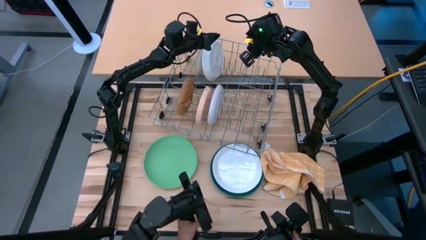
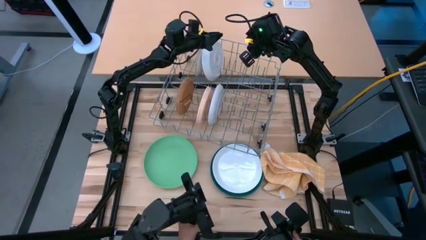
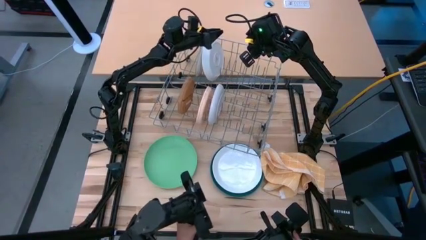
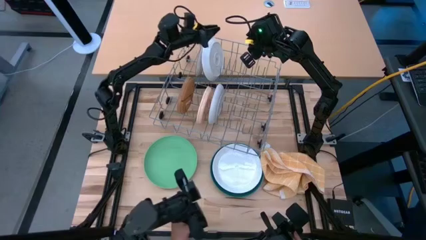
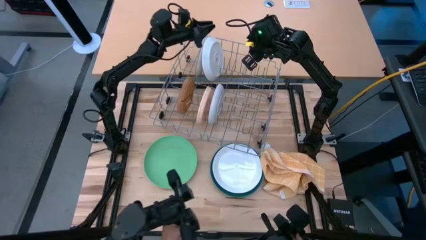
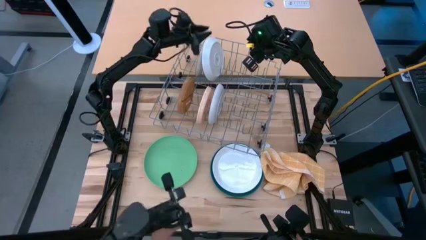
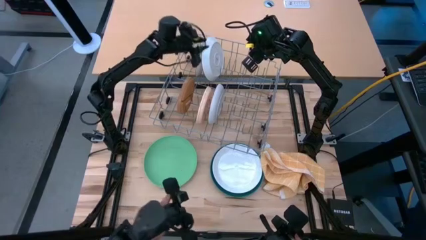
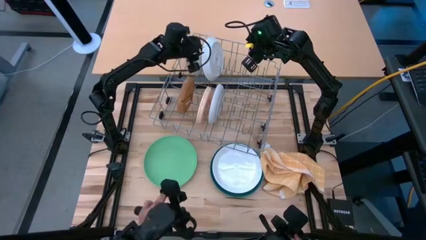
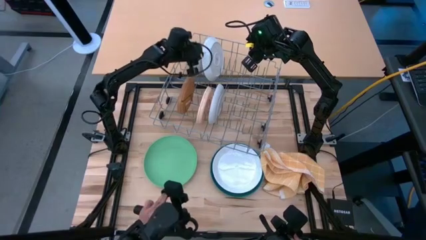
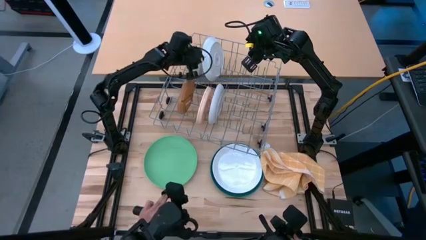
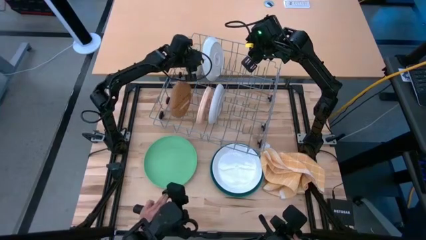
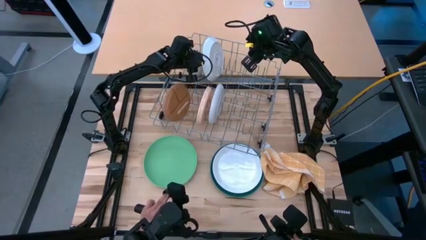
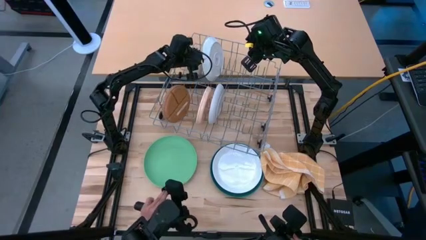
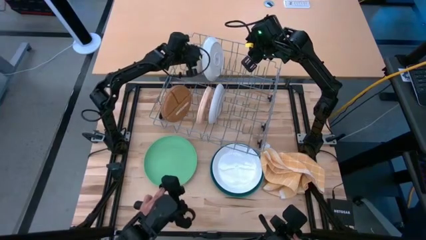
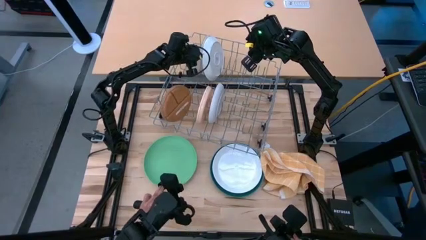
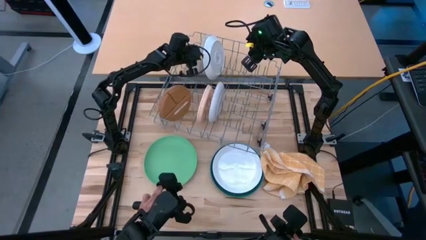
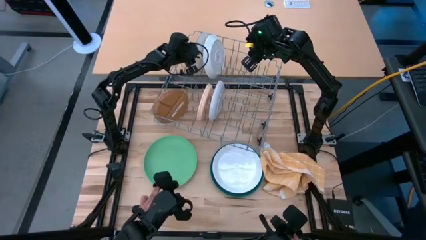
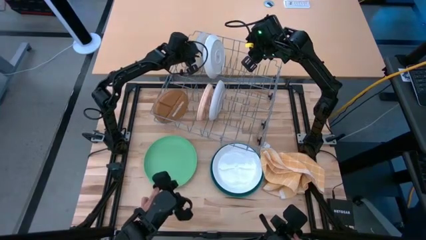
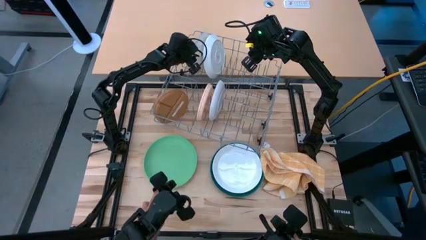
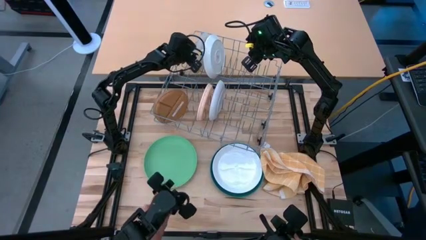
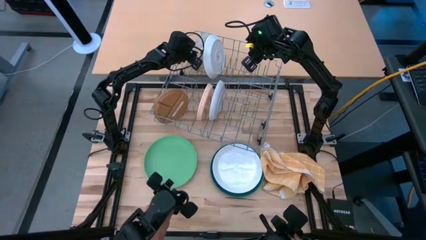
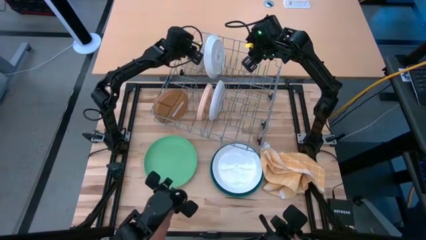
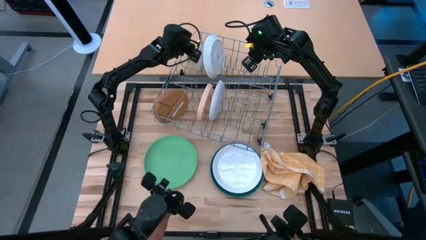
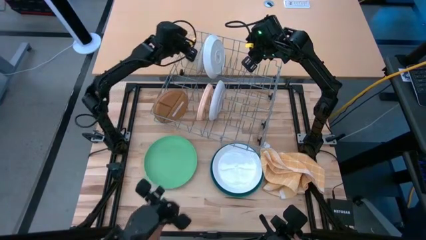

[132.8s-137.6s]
Task: Sort dishes
Adjust the blue patterned plate in the dish rack

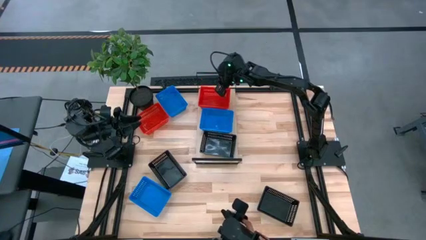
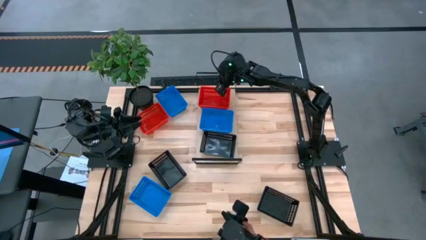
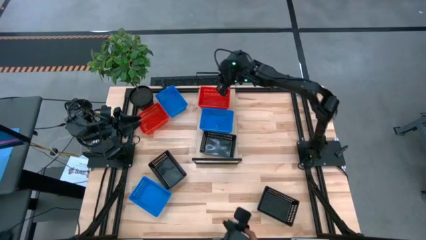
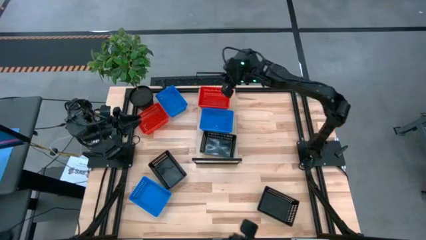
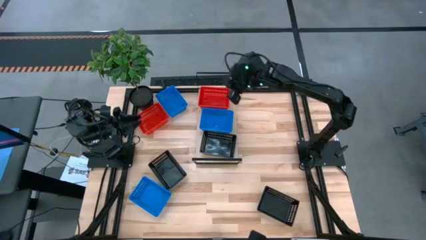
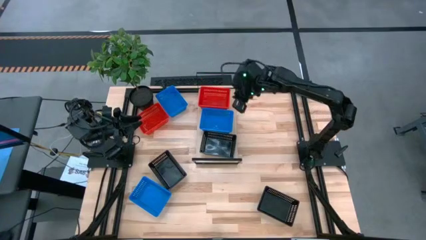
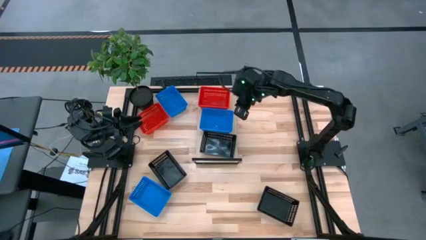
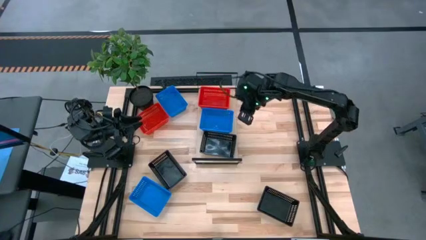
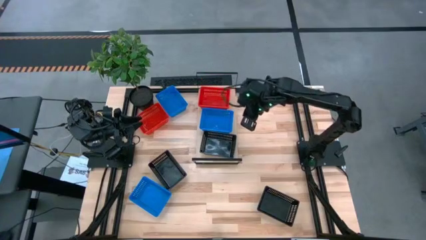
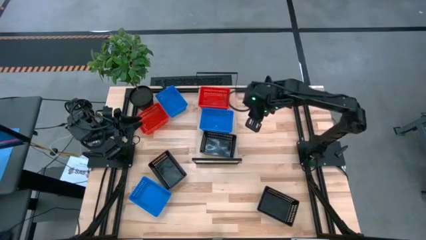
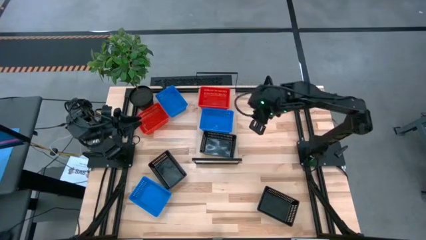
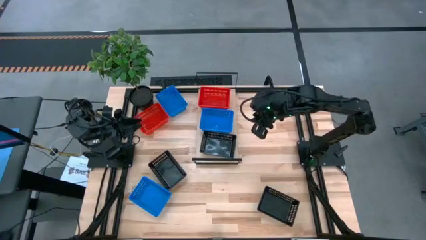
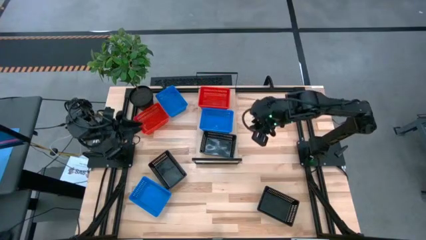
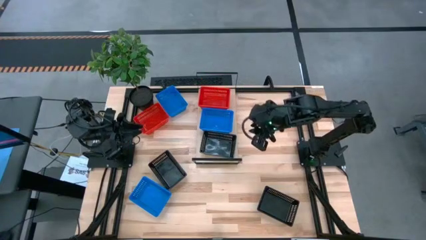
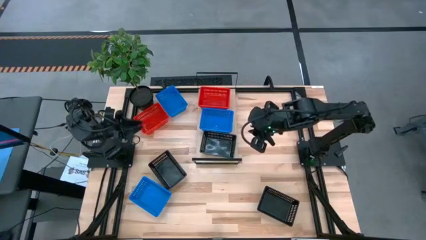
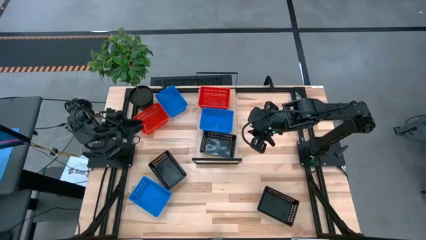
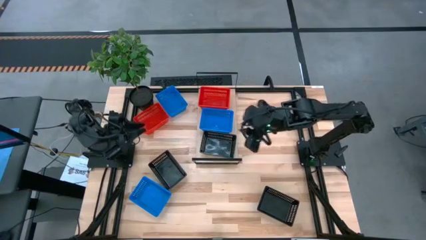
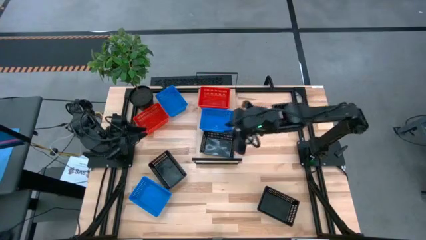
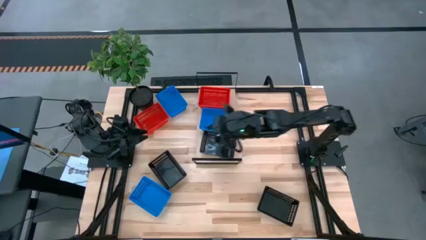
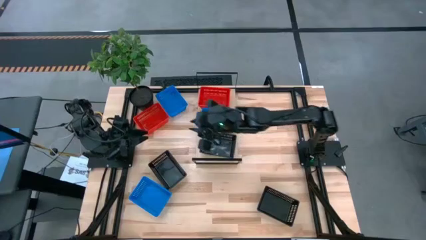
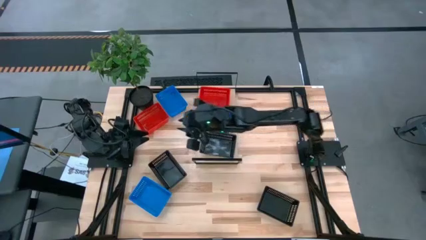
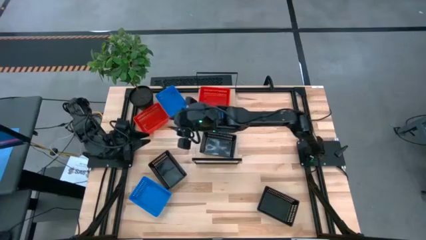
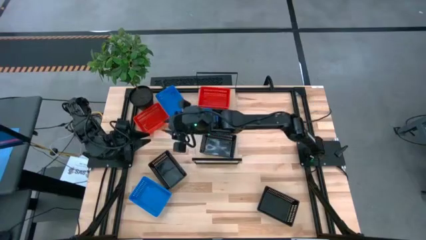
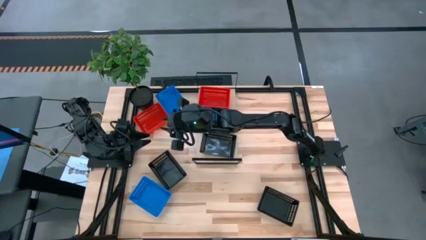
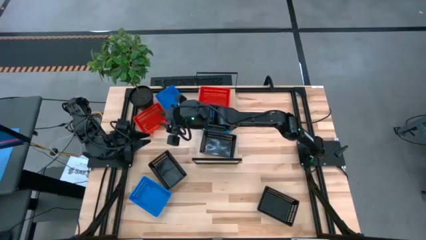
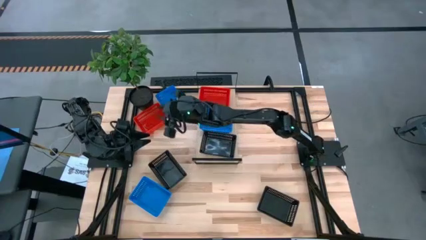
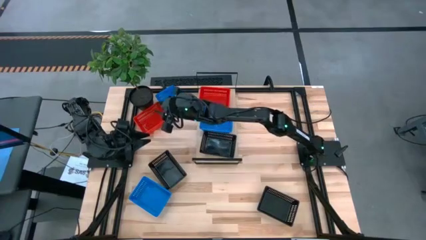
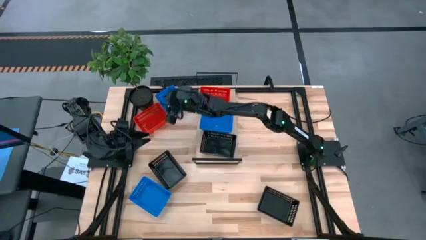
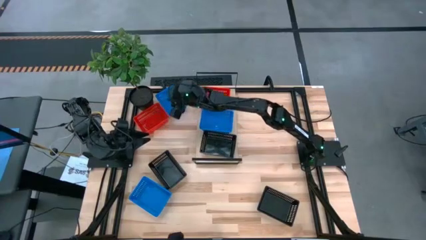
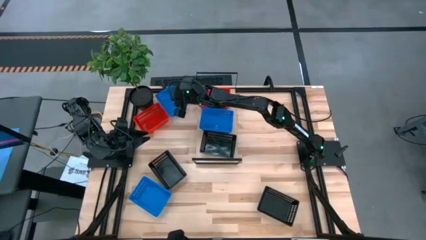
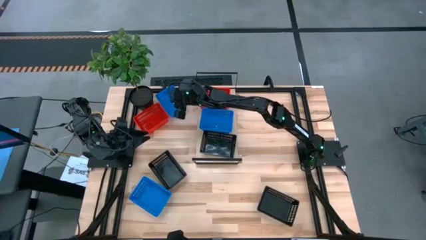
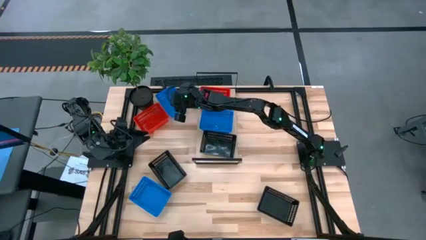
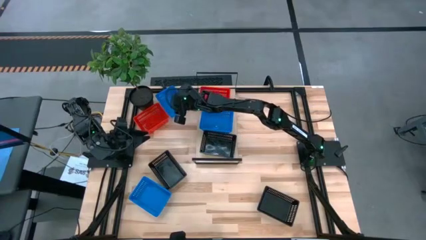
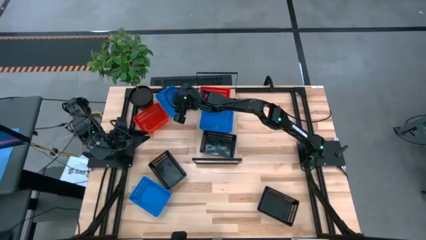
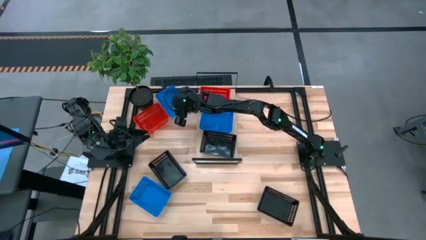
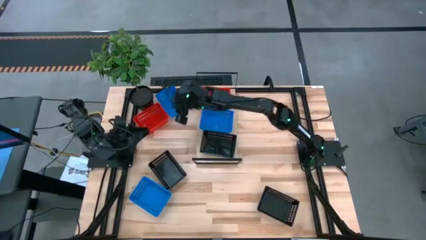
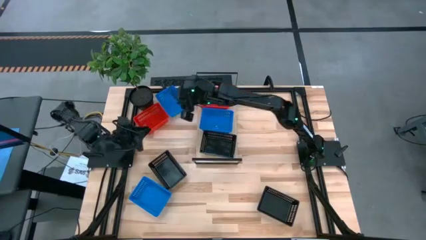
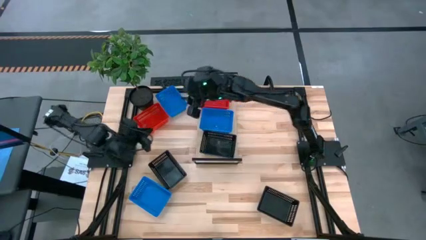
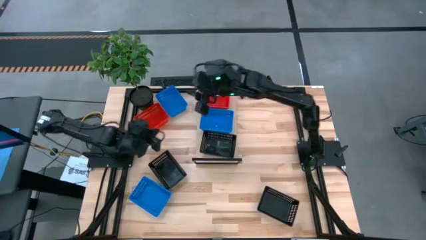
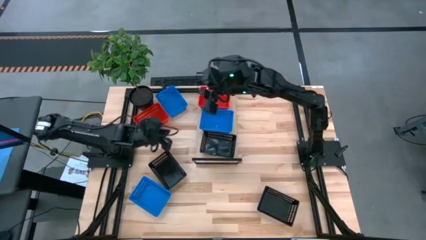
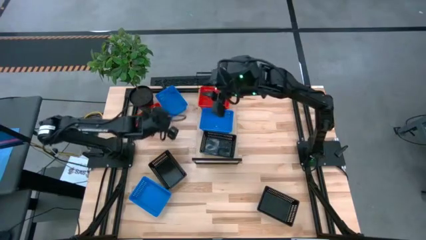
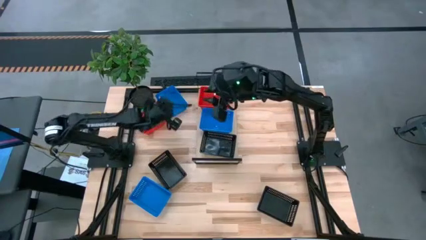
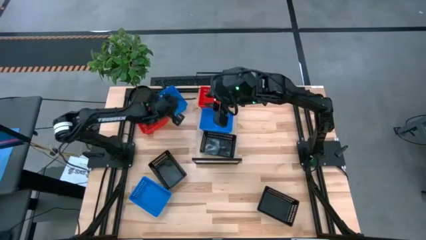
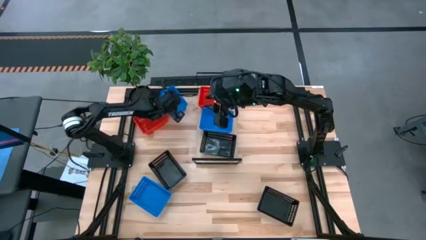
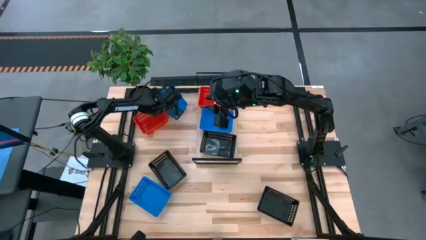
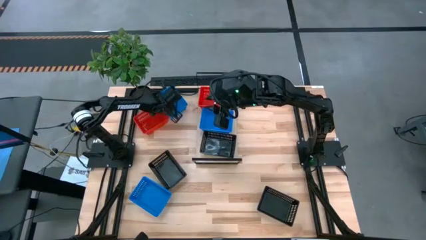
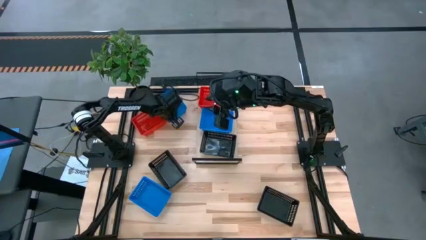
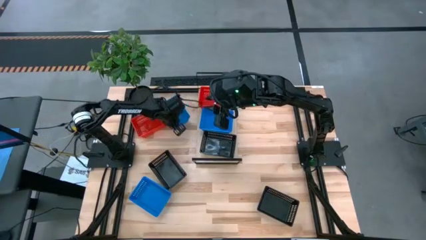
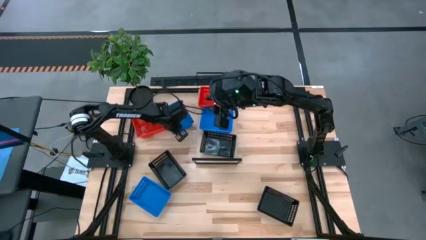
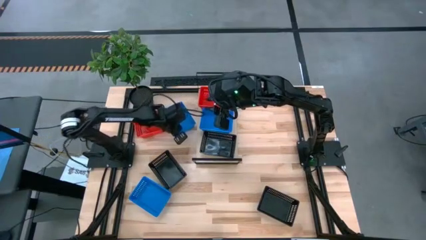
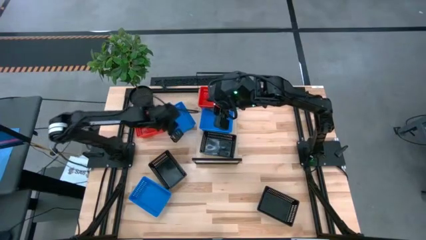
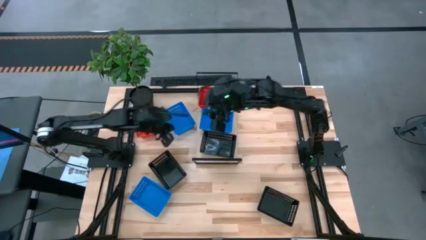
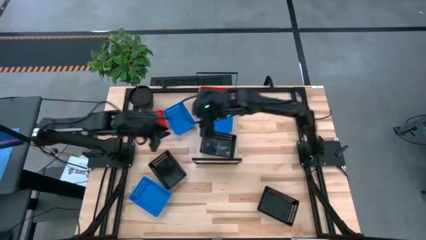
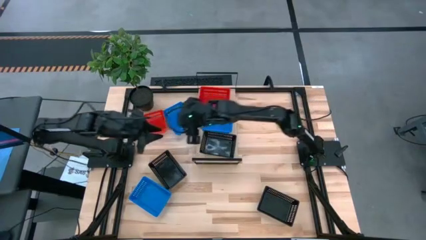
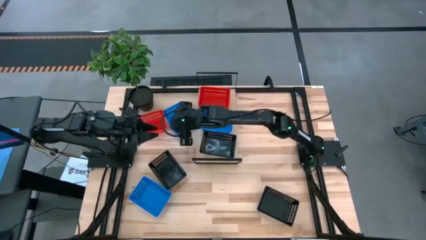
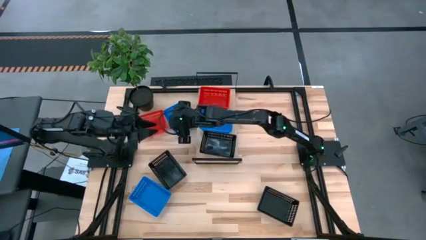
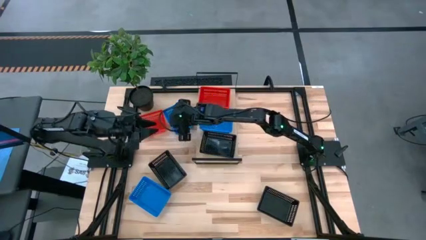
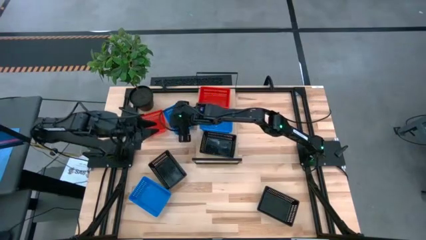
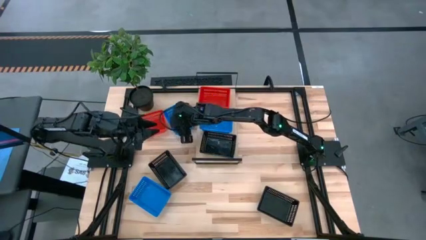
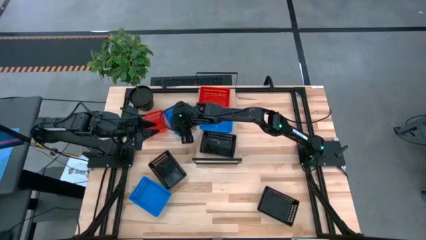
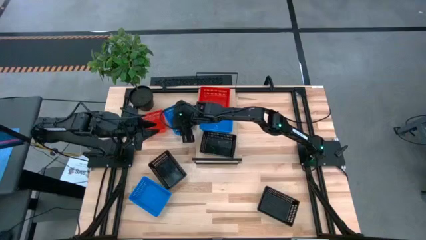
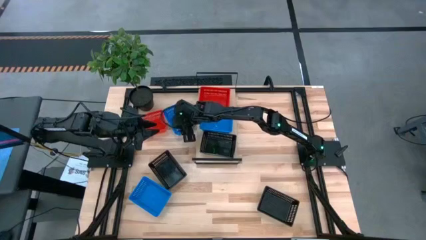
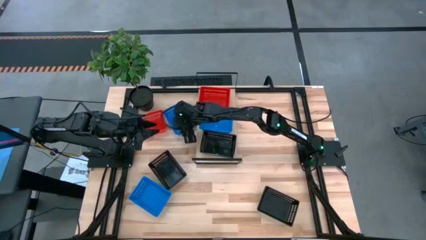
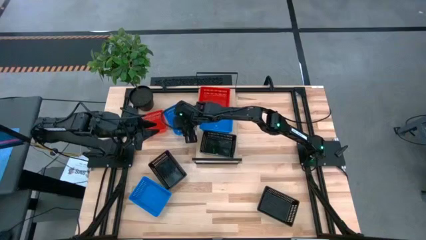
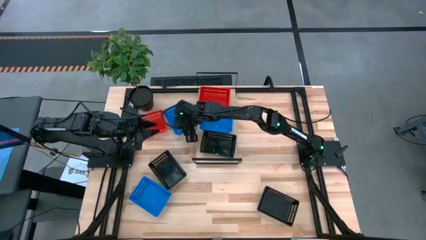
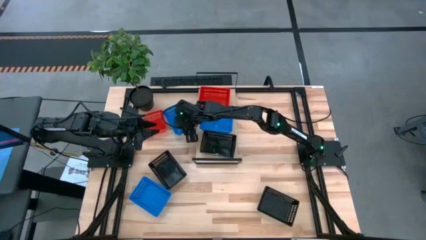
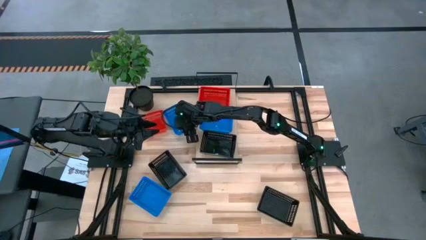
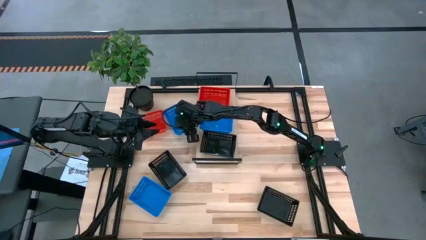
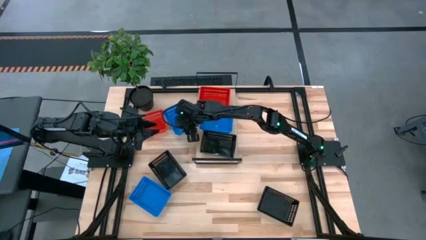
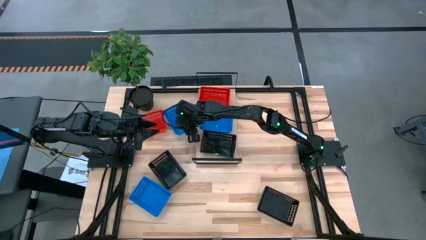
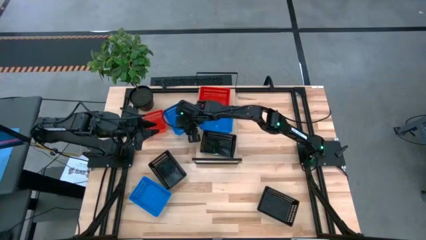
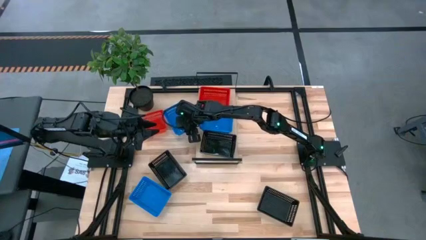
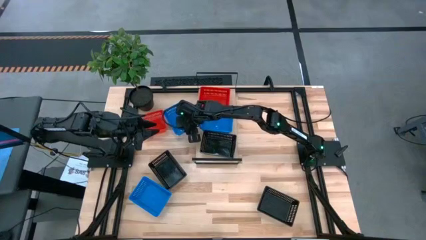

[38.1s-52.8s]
Task: Stack baskets on shelf by color
Stack the top blue bin on the blue bin on the shelf
